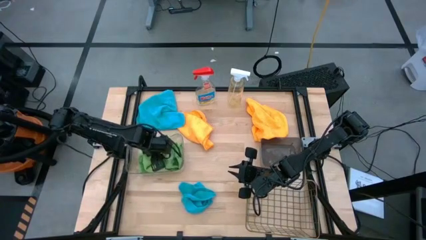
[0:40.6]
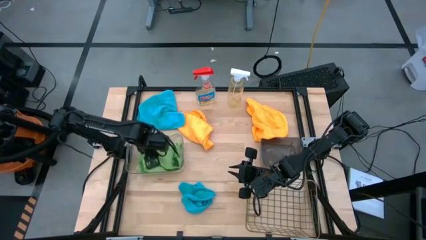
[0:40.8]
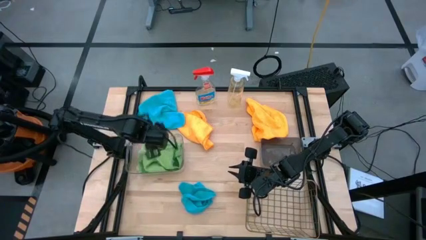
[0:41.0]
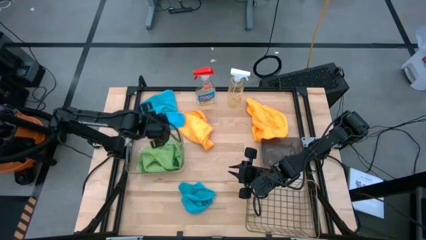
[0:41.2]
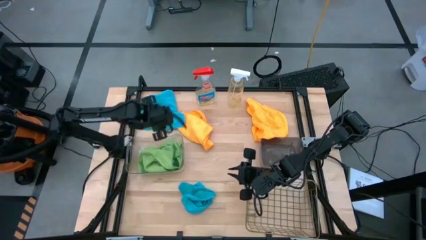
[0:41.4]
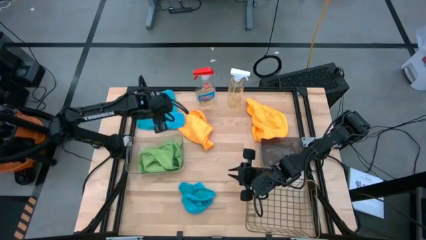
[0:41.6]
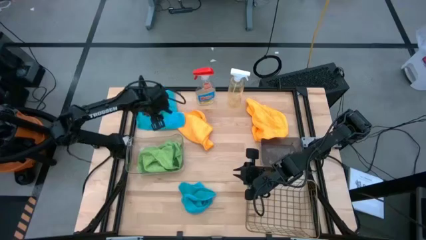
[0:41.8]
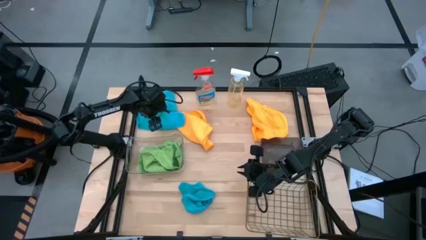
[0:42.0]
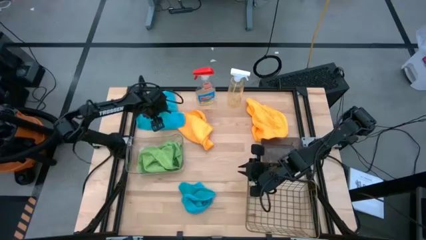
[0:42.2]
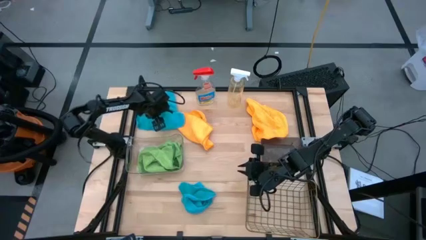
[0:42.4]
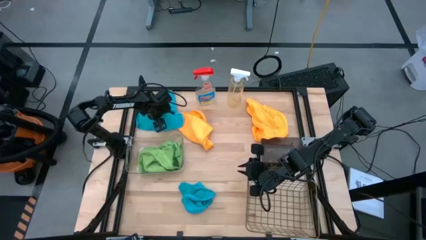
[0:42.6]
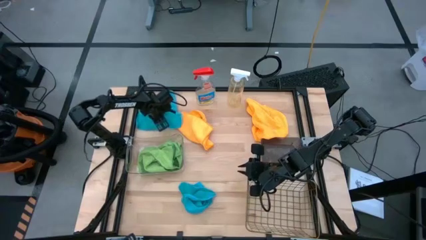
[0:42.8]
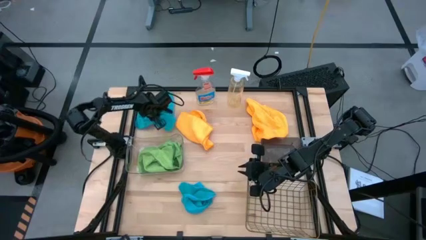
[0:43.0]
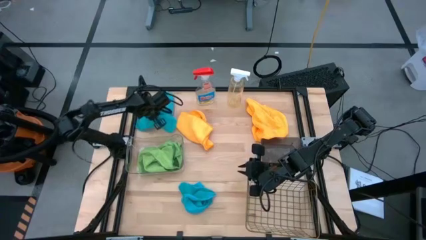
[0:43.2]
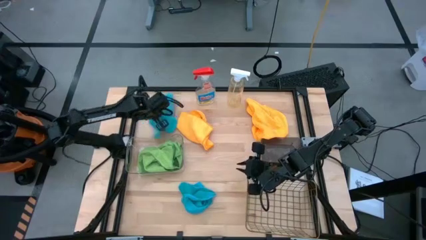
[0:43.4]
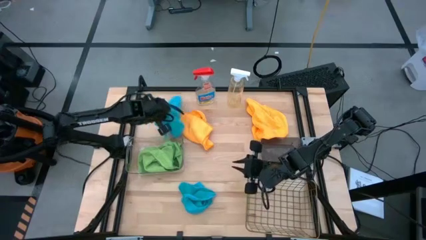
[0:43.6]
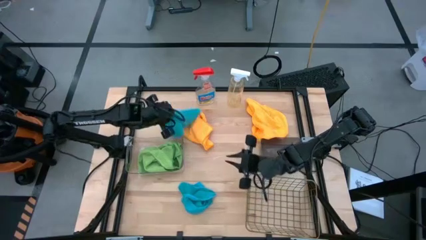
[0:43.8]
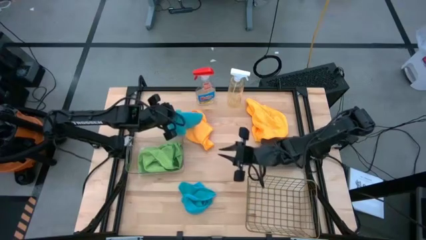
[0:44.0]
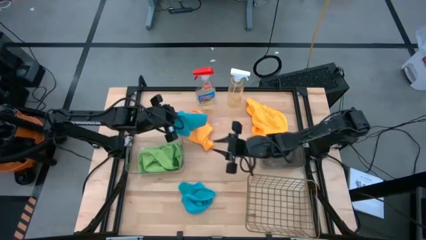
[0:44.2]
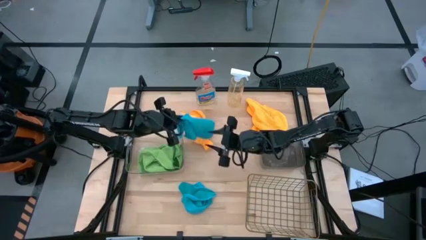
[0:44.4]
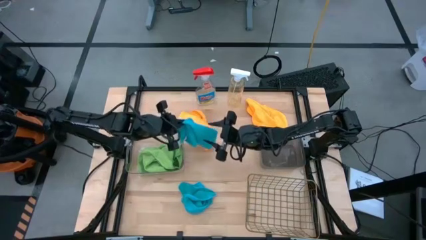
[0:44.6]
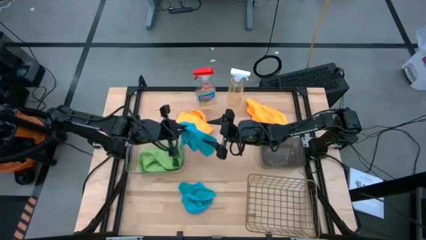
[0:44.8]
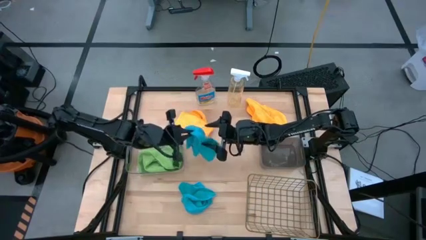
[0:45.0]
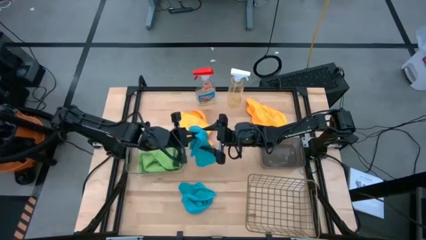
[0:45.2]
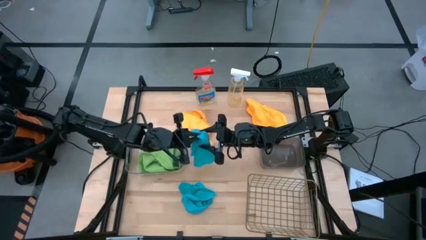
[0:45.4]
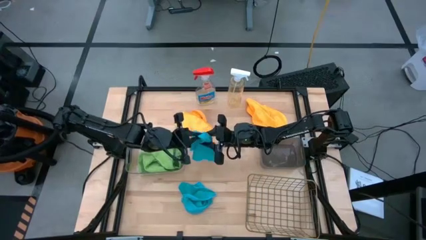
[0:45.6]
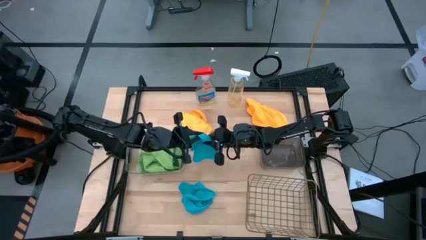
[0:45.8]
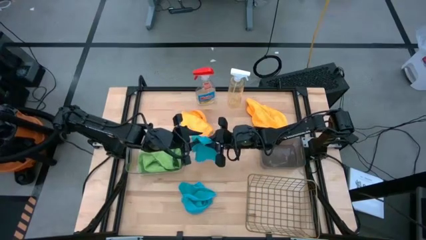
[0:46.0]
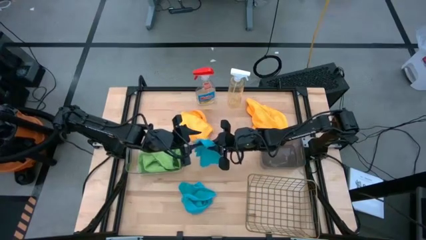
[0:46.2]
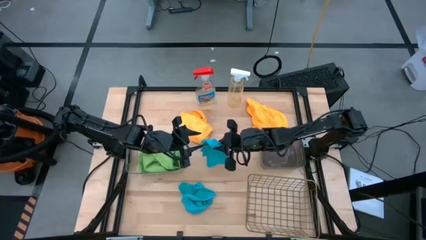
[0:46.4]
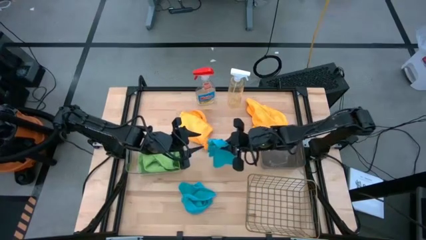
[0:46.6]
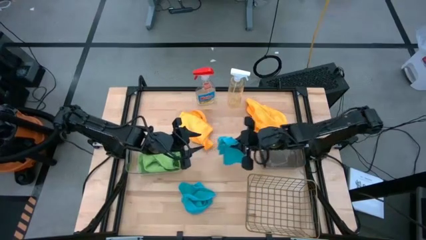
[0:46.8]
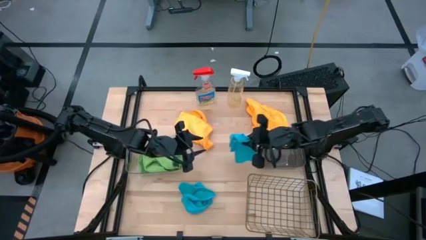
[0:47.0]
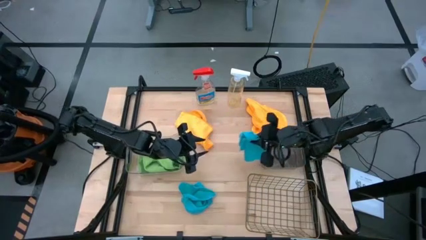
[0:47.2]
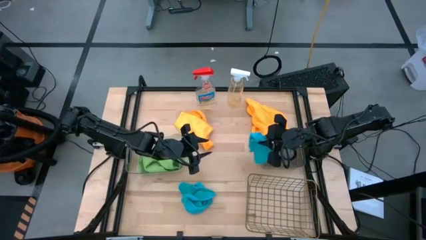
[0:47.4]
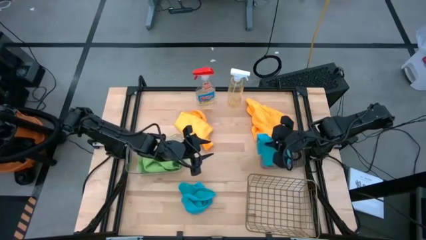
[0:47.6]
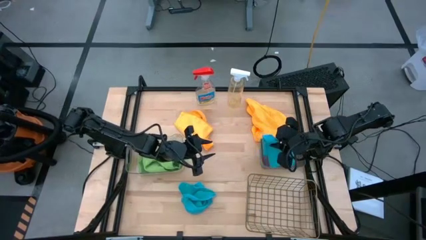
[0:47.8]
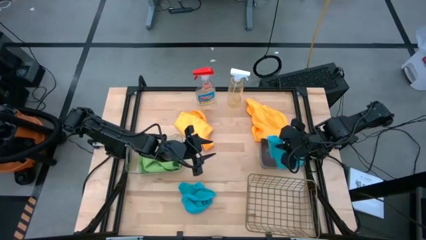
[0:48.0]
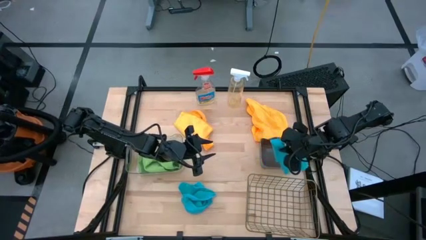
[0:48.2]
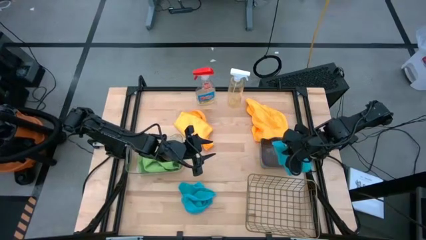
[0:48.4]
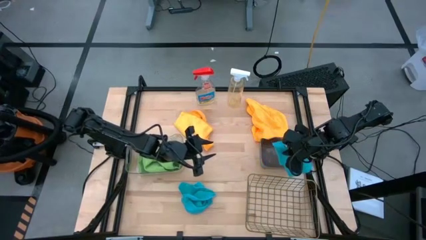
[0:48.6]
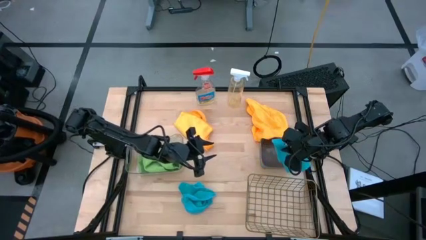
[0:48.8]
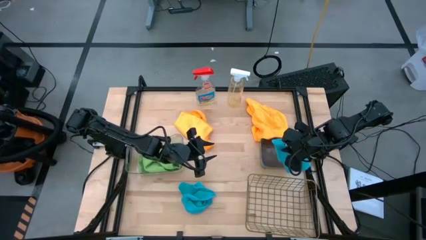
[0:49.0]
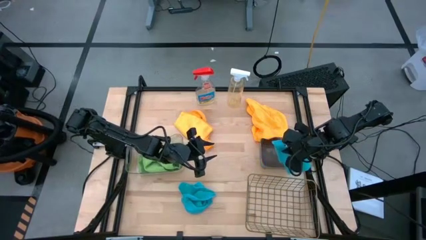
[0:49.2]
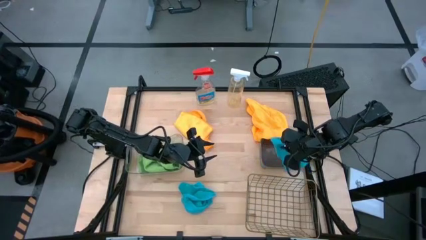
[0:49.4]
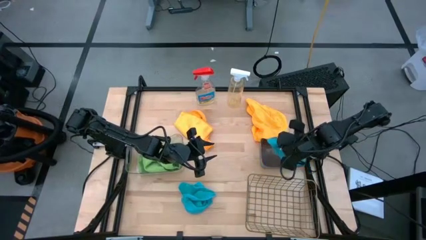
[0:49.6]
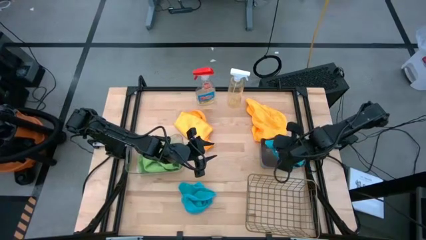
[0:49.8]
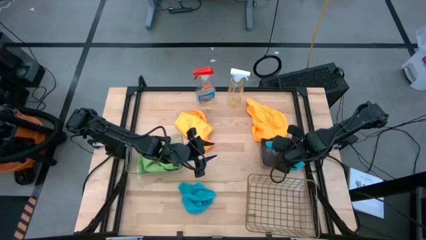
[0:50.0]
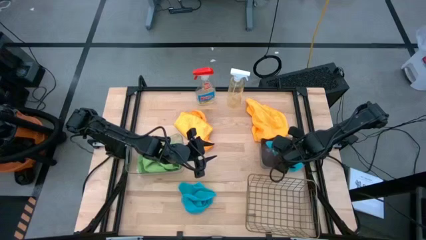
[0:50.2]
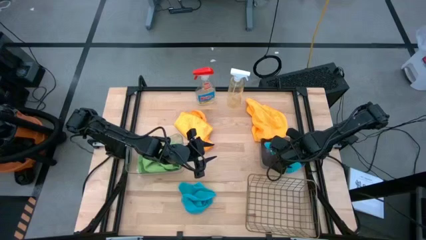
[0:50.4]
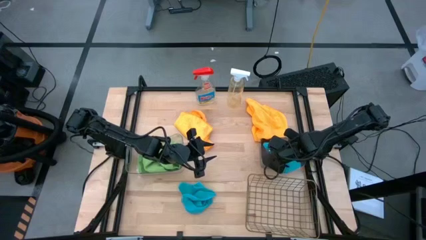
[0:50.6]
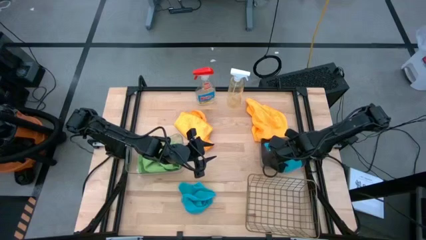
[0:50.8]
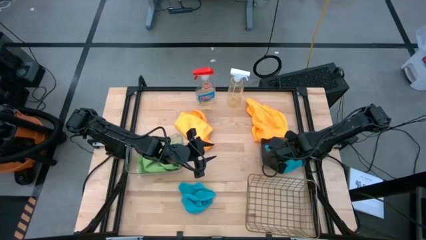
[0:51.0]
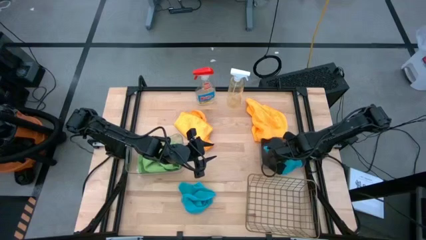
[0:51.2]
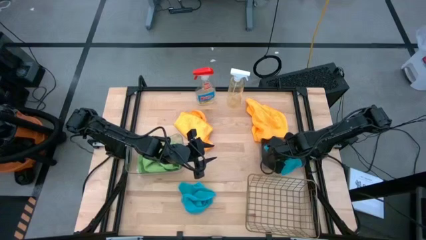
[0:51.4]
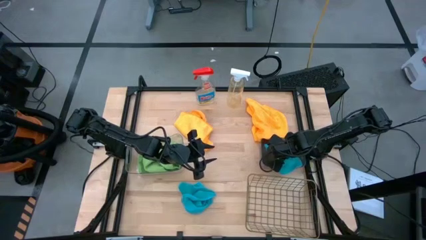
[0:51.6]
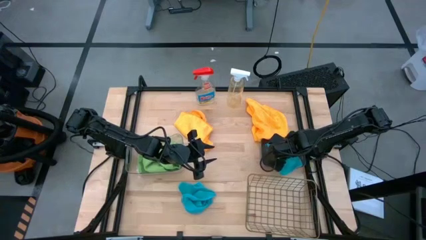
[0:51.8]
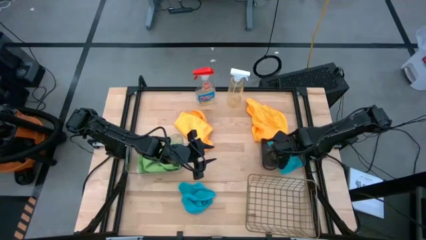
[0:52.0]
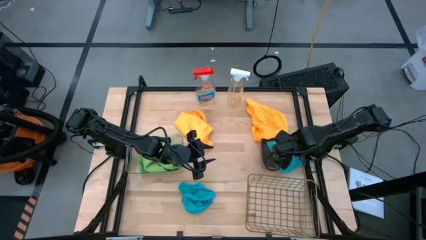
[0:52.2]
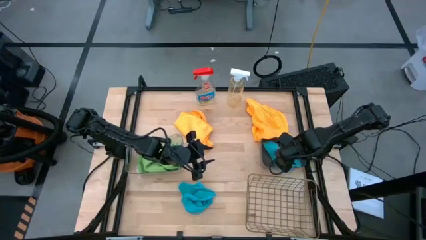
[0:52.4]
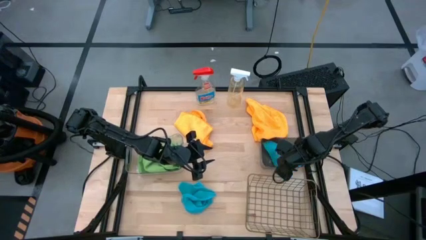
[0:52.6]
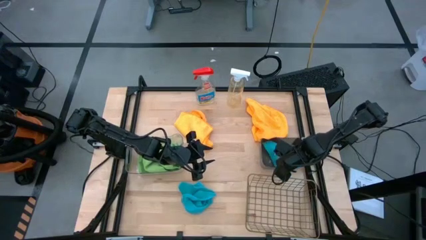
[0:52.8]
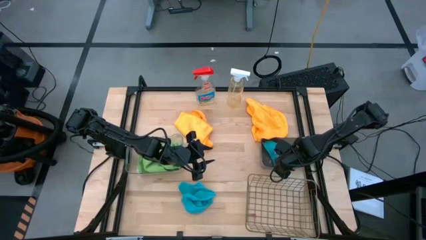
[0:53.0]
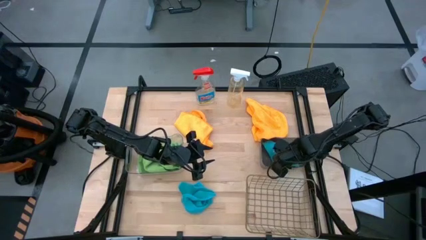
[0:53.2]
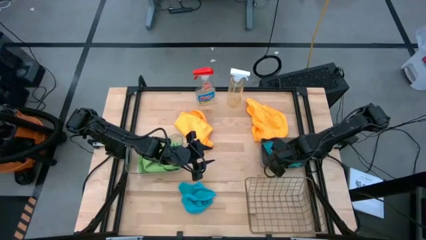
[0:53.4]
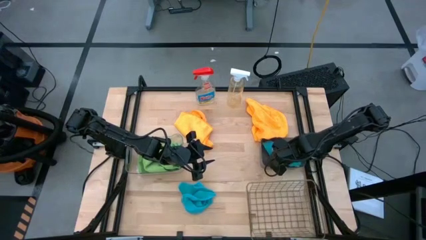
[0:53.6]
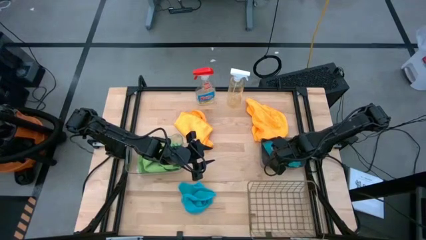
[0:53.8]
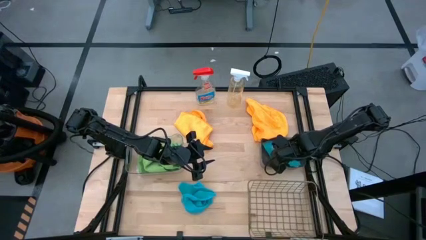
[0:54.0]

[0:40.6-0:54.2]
Task: Sort microfiber towel by color & place in baskets
Put the top blue microfiber cloth into the black bin
